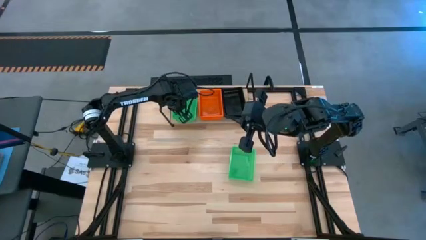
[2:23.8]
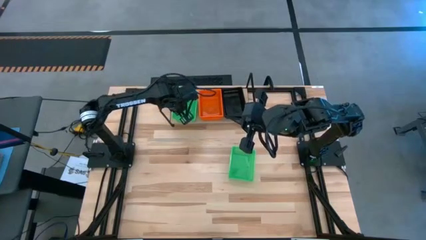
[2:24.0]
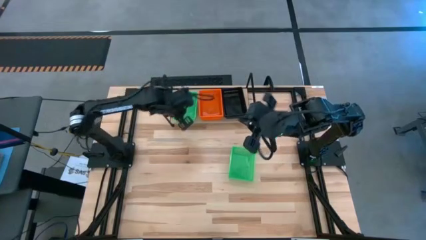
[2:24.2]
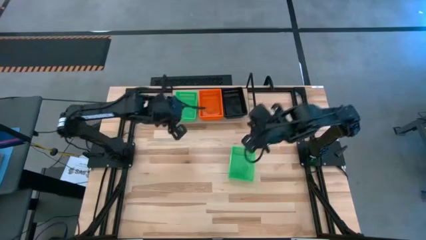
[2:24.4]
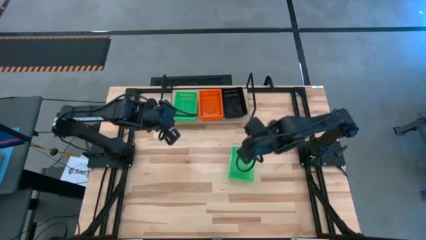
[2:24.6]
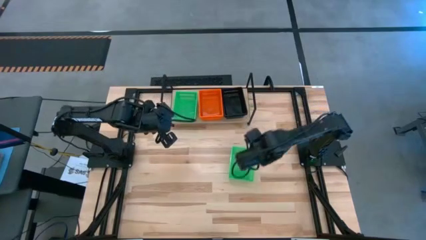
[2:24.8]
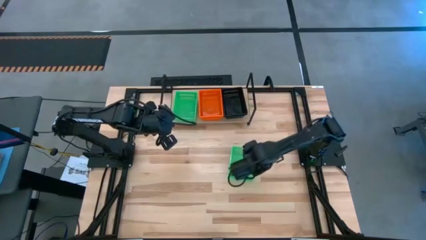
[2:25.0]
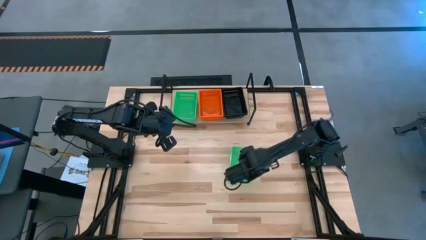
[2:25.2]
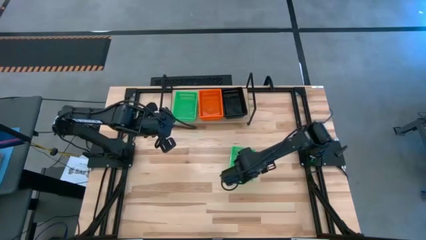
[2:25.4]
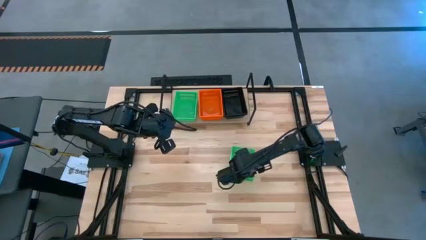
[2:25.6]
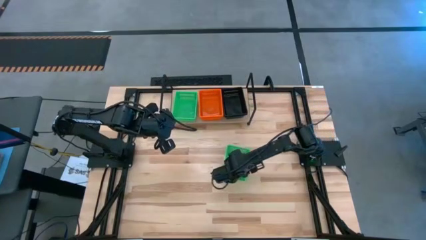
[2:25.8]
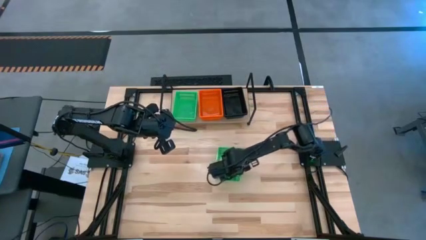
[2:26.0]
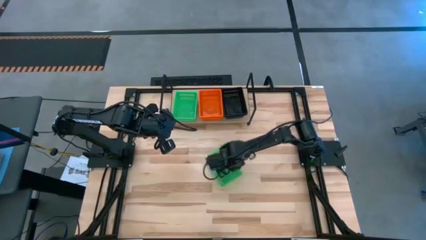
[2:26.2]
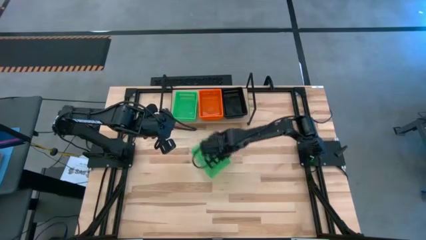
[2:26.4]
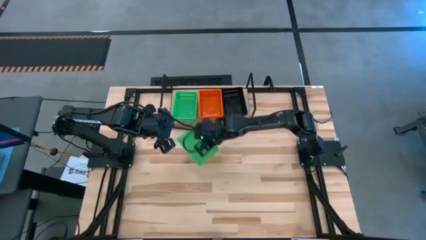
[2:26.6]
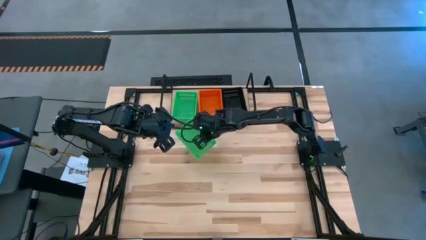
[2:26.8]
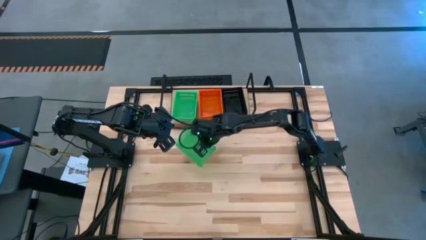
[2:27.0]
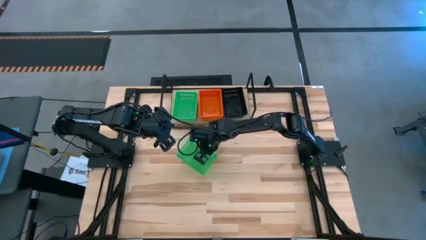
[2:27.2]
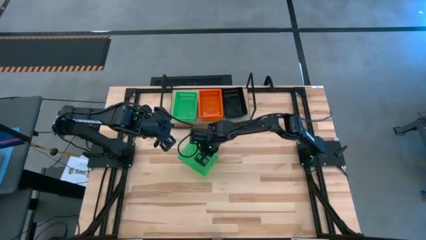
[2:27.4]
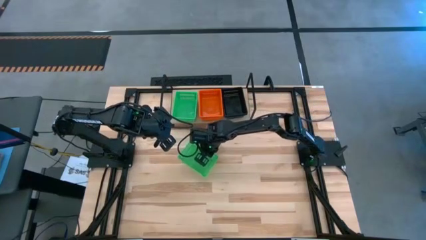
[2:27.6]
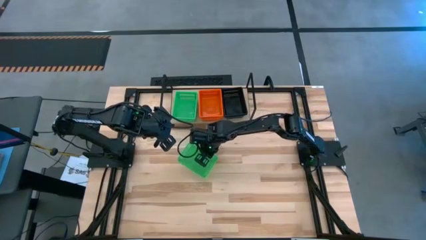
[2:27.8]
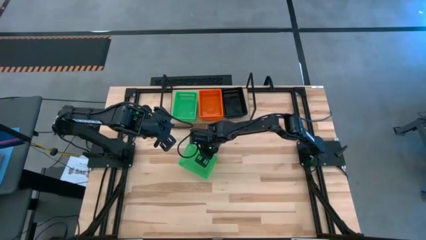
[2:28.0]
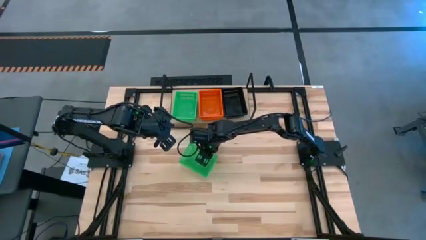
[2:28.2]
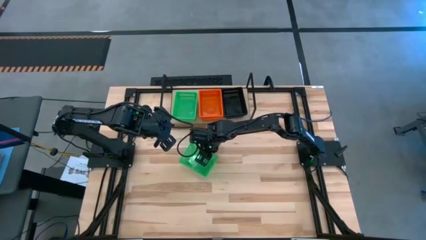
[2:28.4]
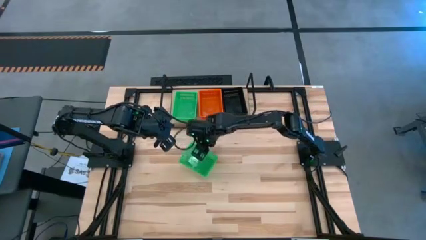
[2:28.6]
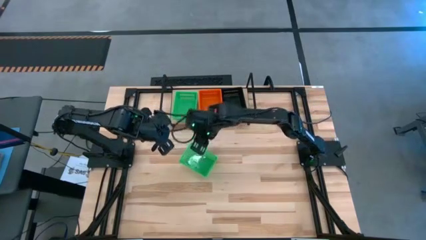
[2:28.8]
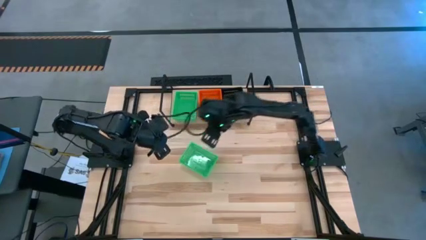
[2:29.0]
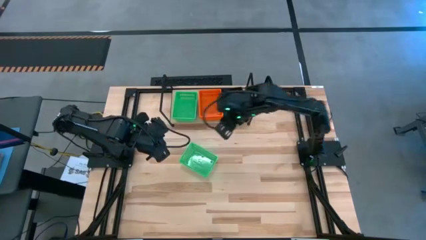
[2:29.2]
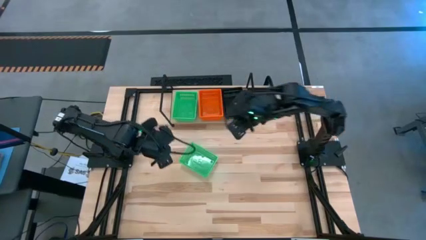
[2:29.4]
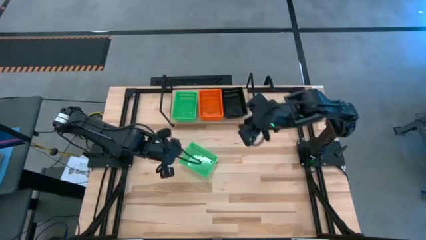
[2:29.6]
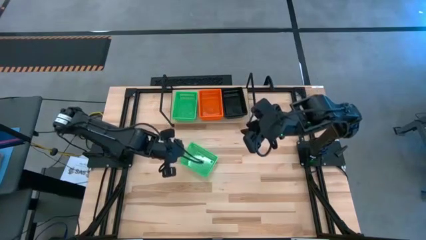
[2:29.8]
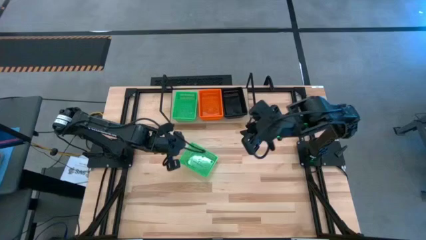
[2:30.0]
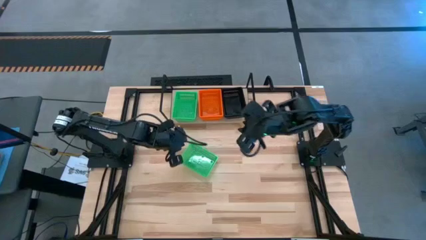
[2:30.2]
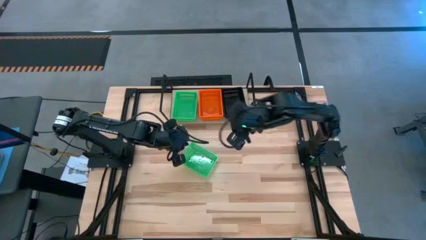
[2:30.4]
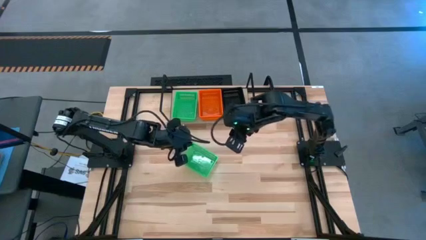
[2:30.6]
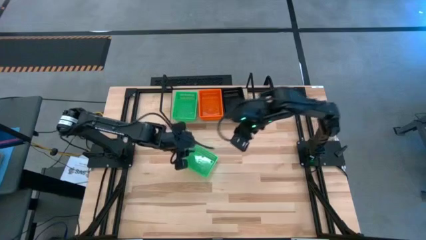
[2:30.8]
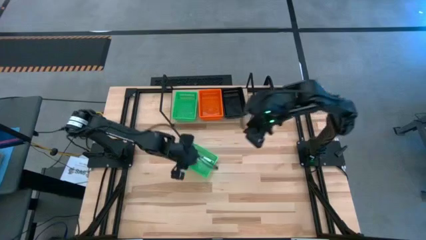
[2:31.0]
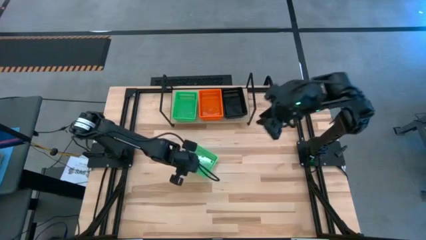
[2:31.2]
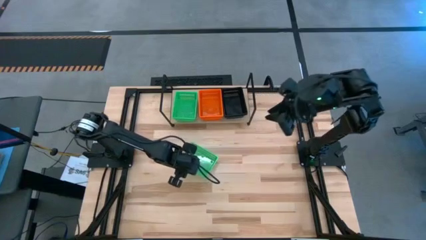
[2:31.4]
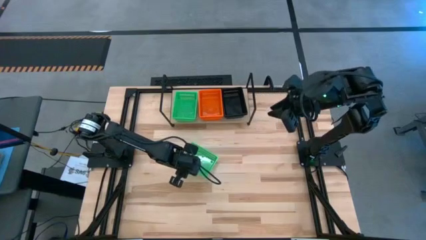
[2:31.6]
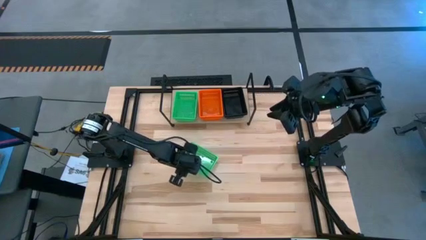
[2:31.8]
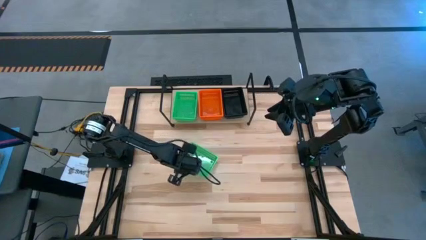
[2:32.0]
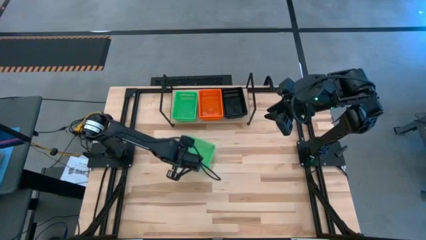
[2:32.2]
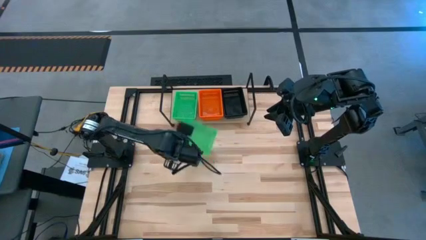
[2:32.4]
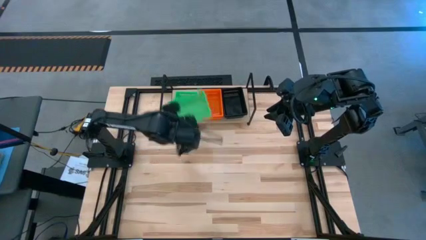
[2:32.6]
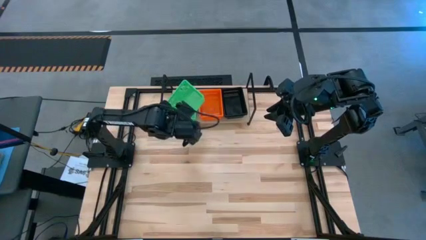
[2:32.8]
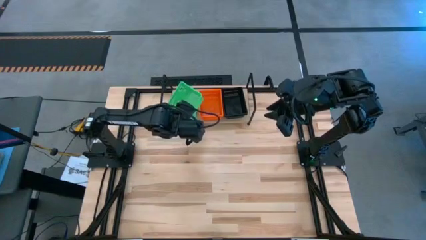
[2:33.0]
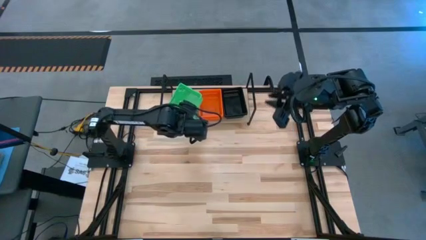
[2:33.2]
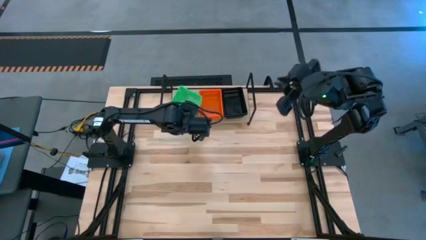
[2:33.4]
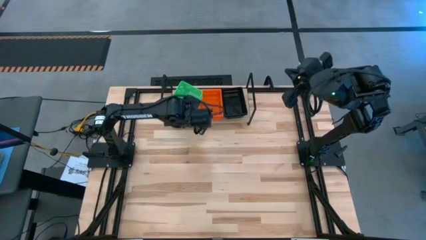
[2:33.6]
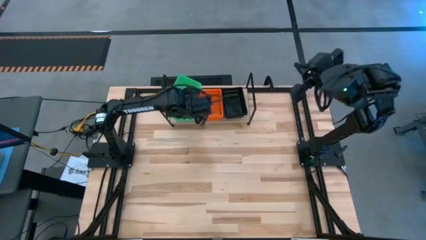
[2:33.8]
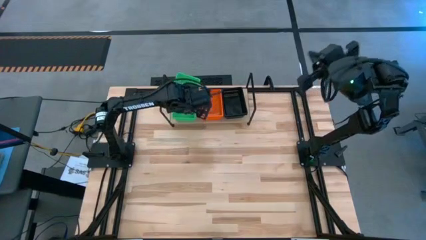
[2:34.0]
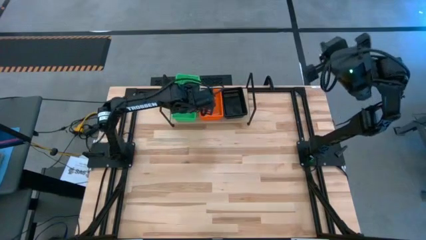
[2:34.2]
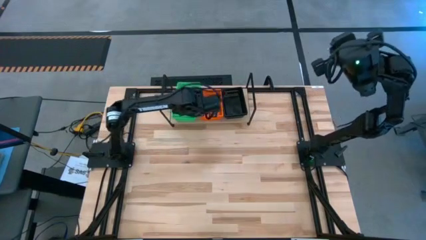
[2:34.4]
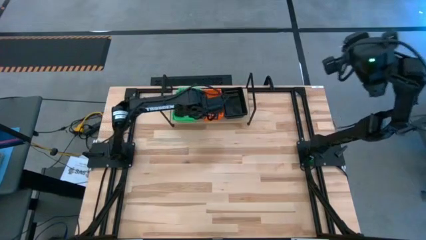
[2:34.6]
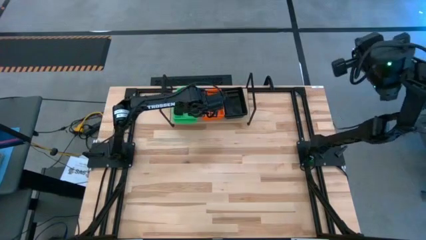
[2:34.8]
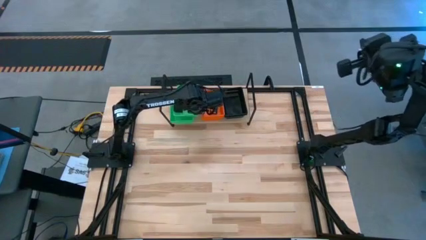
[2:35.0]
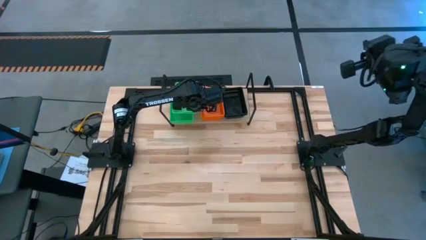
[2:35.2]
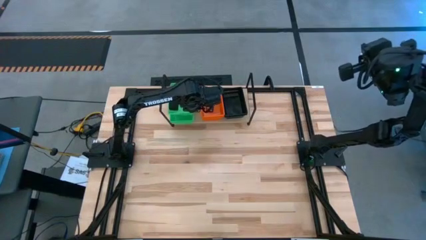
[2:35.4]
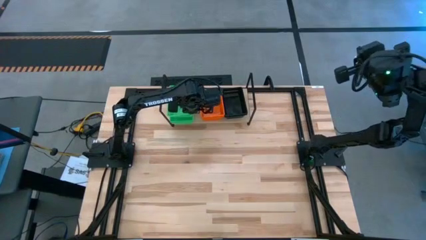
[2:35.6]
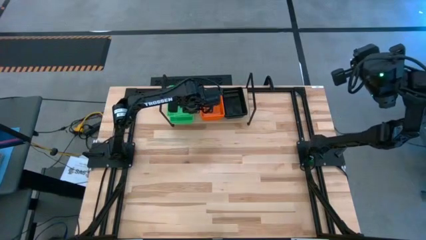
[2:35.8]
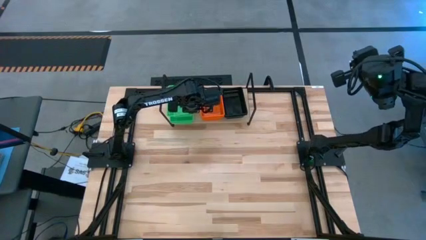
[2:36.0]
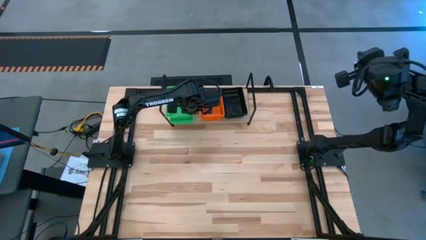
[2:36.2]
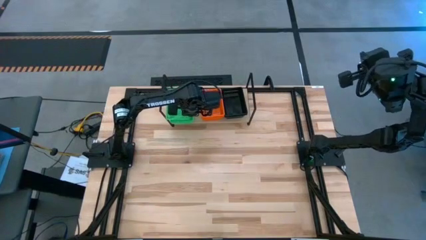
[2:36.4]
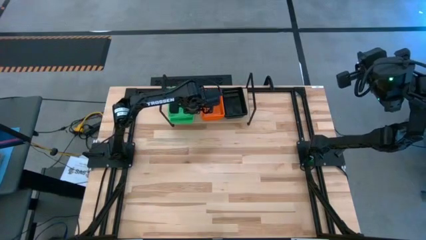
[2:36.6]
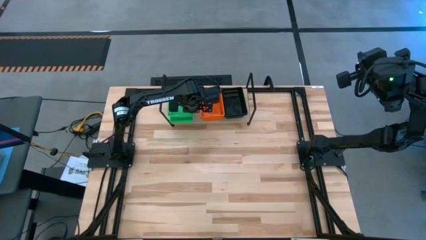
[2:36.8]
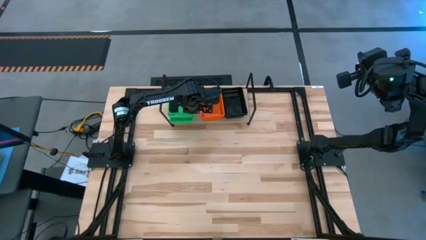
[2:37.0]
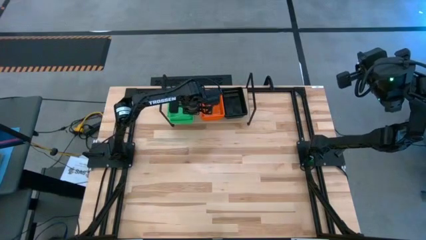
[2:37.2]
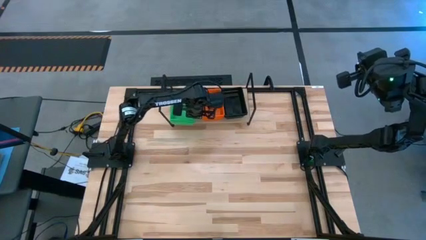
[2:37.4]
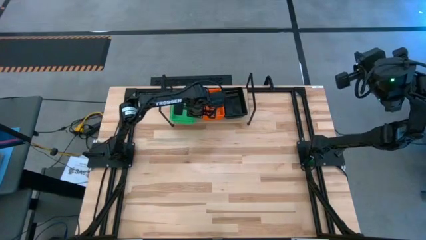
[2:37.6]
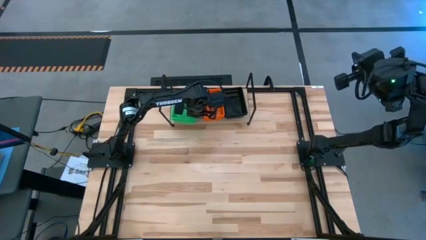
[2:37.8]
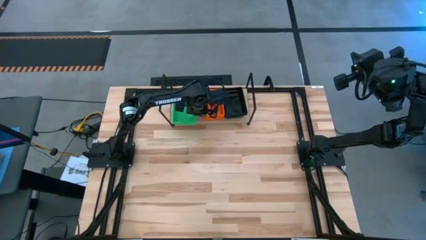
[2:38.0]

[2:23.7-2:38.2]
Task: Stack baskets on shelf by color
Stack the green bin on top of the green bin on the shelf

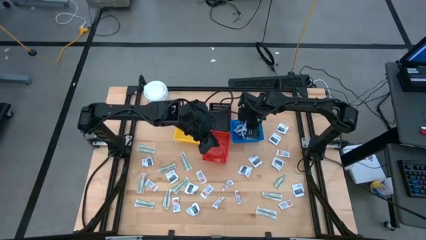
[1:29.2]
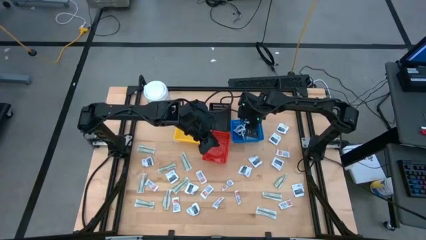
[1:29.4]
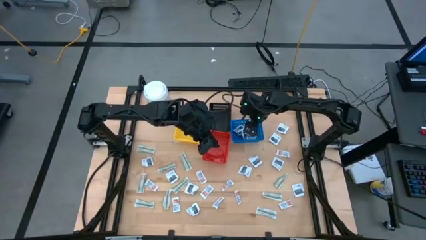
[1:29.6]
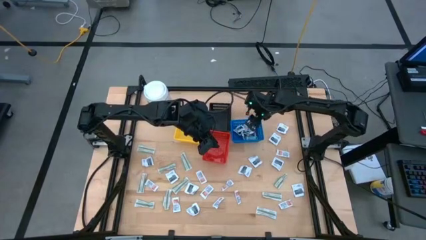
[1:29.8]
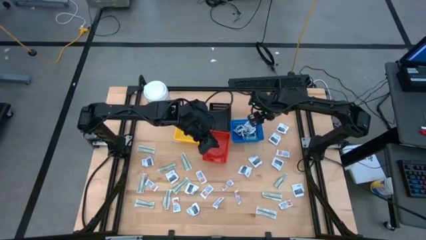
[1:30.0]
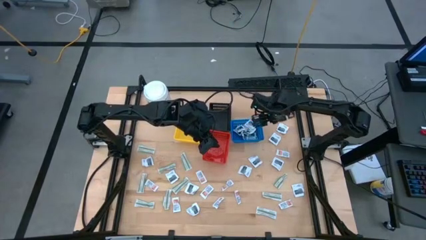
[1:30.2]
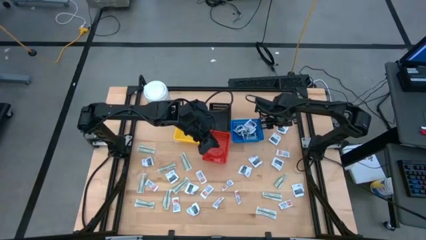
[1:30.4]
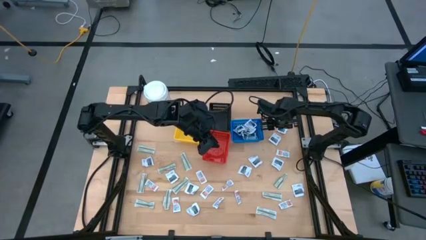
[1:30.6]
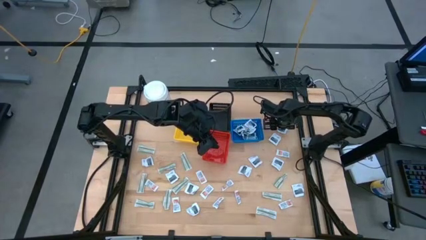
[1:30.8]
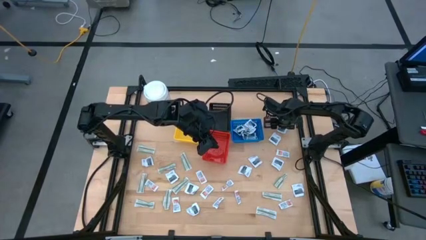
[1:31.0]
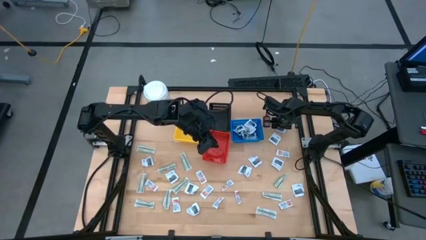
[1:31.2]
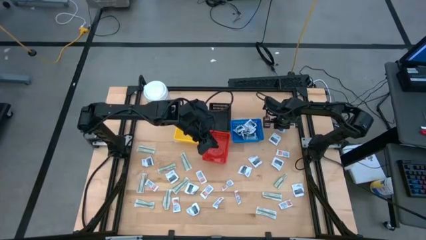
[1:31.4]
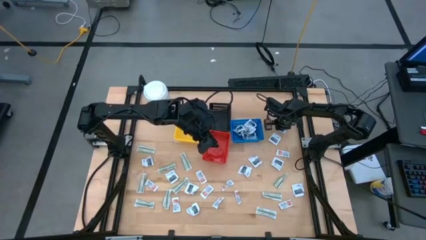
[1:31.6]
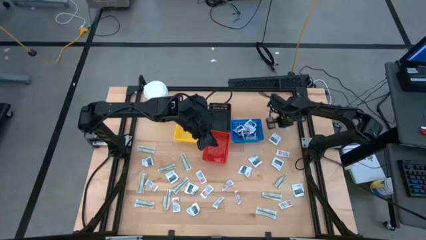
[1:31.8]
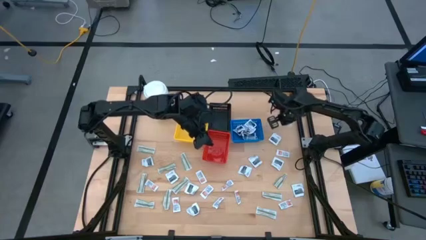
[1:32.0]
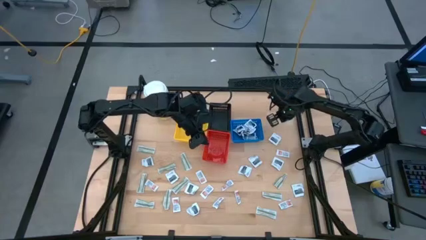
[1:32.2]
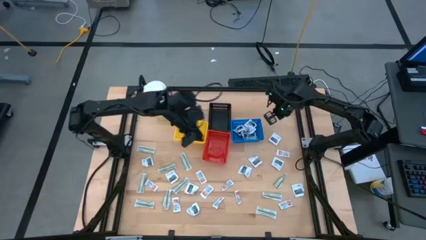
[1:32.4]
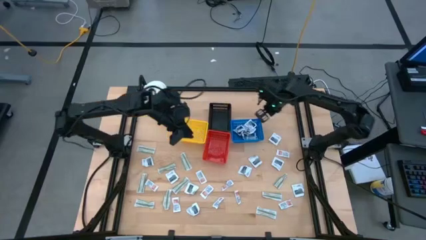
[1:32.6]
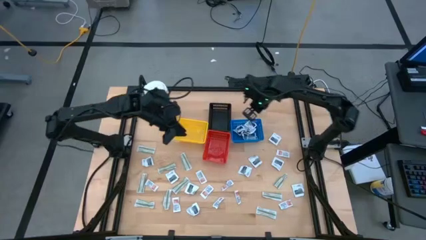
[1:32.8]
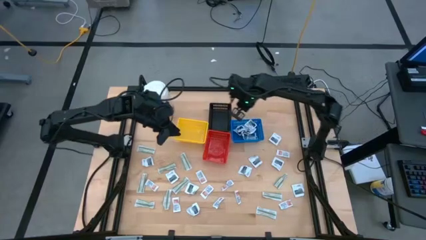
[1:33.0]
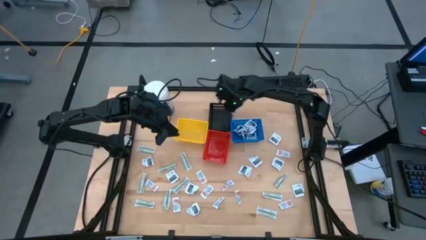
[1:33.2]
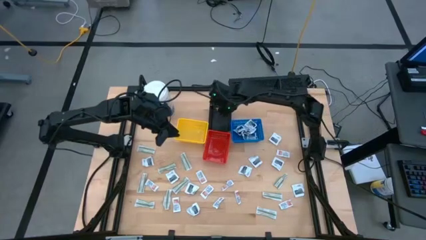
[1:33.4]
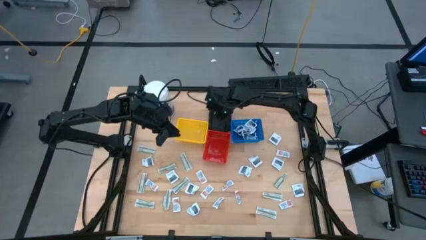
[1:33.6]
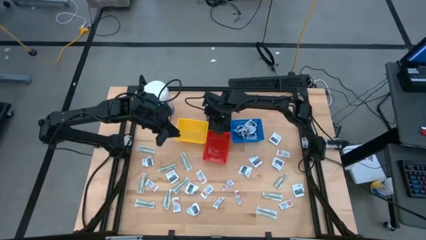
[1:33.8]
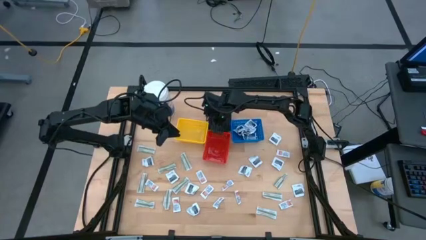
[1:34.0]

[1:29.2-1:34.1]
Task: Pick & Place First Aid Supplies
Put the towelette pack into the black bin
